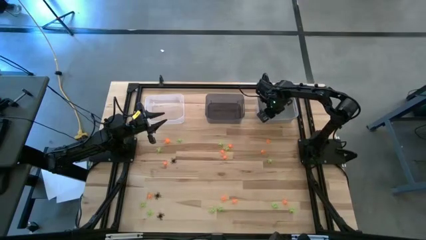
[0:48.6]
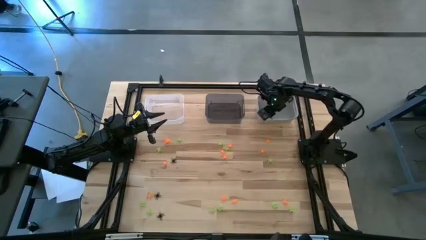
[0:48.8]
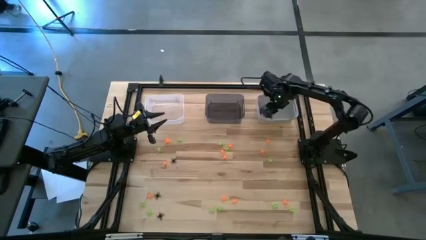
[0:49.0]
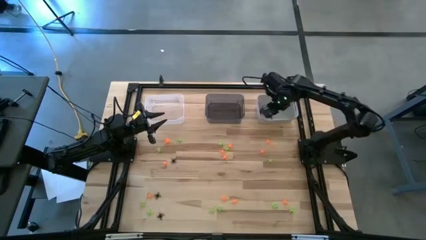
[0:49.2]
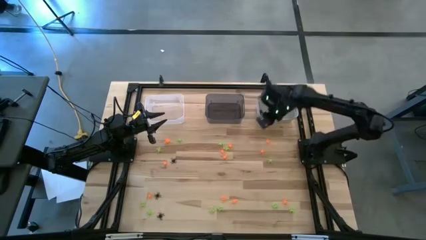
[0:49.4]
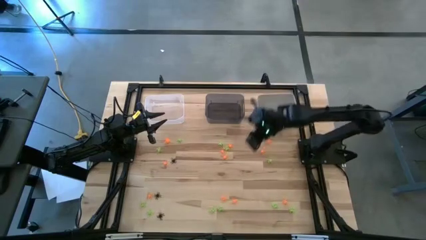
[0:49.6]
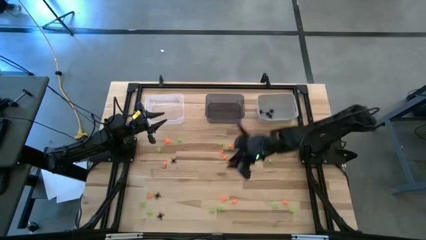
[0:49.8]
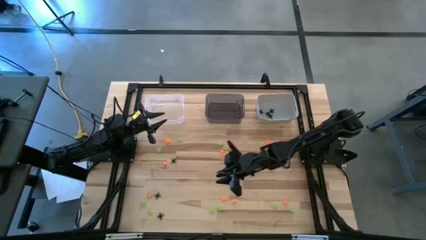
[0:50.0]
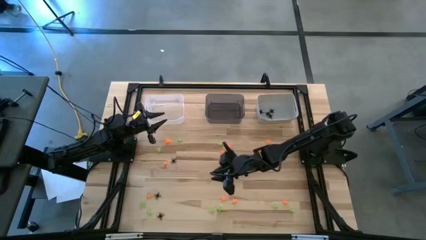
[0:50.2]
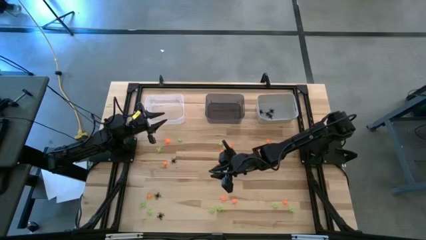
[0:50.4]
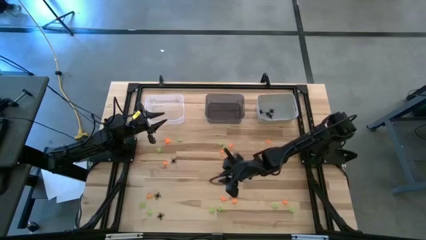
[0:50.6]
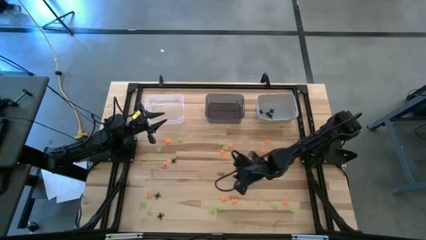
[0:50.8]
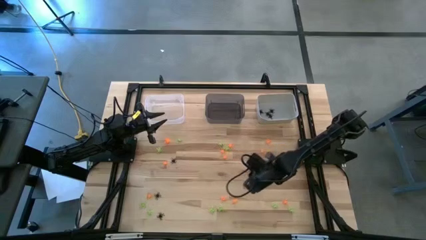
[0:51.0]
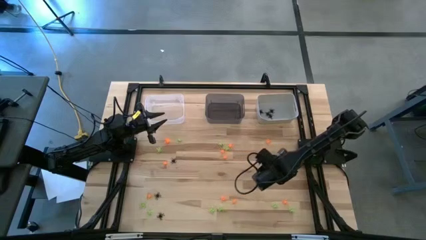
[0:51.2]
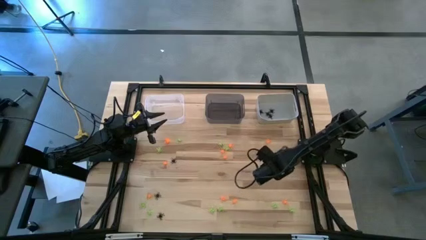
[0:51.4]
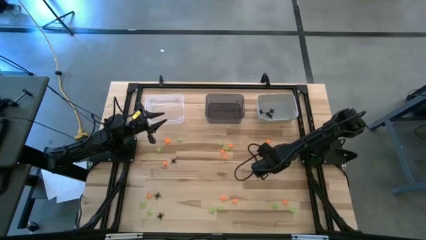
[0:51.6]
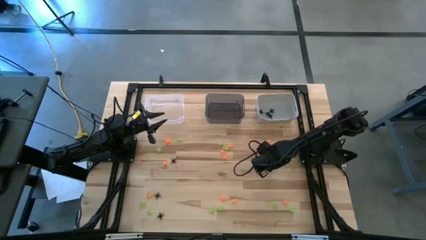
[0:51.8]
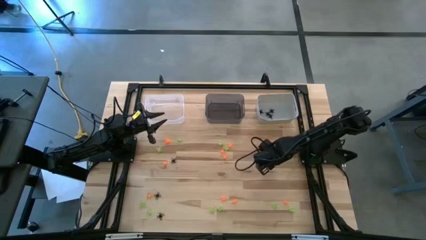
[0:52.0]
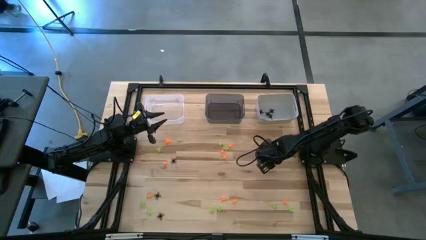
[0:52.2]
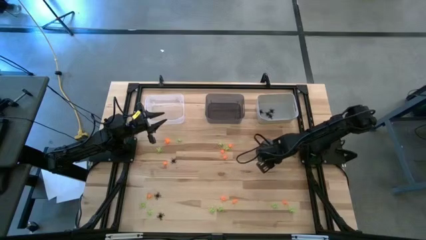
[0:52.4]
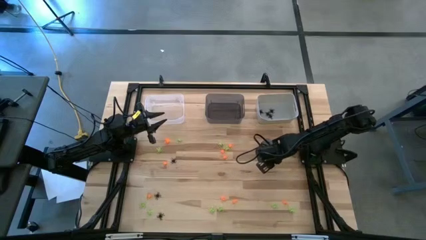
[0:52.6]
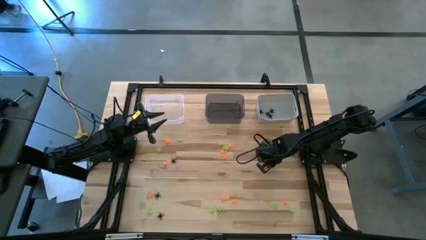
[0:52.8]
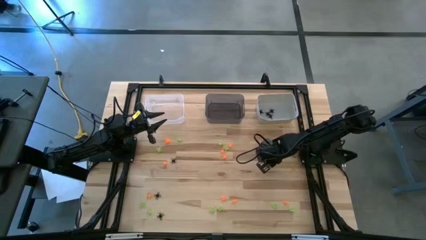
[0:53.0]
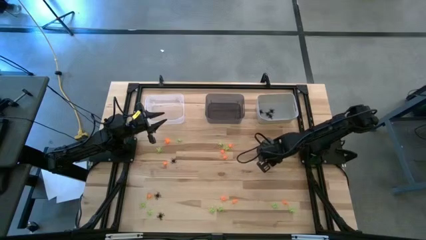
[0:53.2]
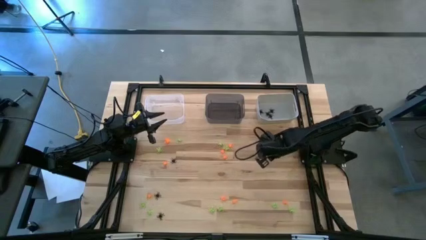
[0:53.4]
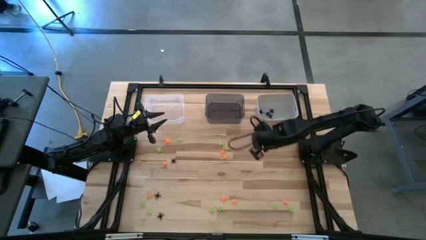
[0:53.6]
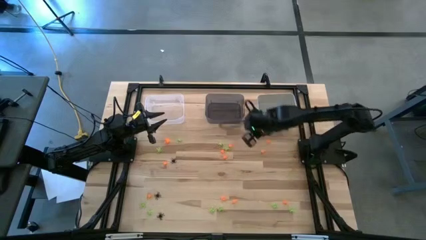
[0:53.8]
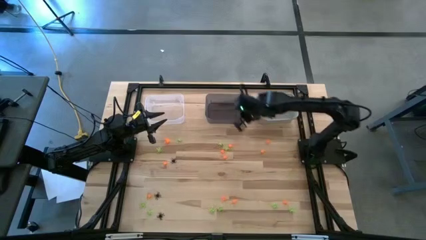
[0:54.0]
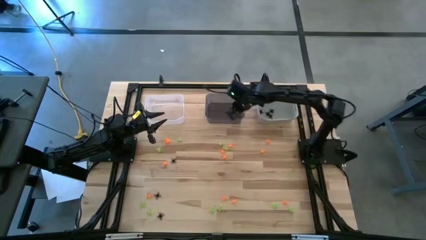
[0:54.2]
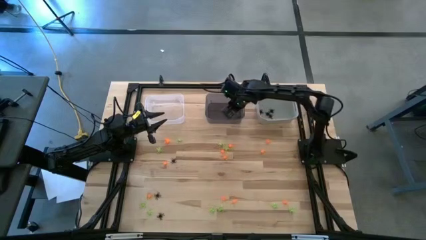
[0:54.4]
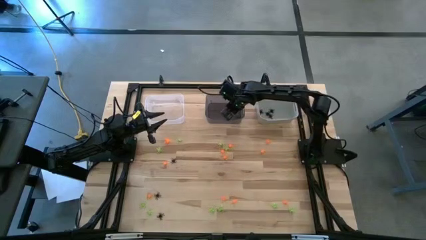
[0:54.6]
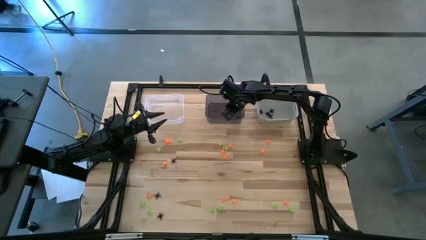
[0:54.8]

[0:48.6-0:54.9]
Task: Sort Halloween decoration
Put the green spider toy into the black bin

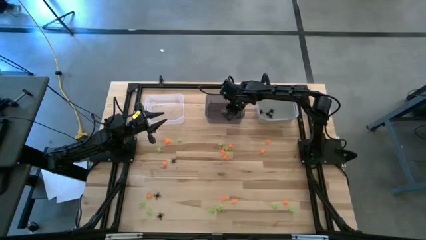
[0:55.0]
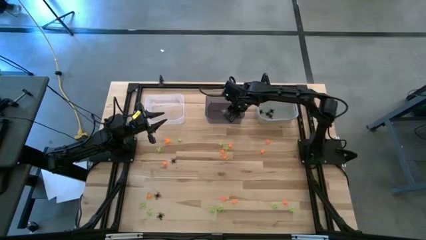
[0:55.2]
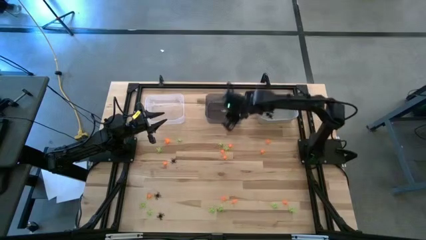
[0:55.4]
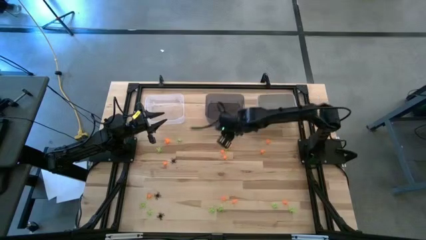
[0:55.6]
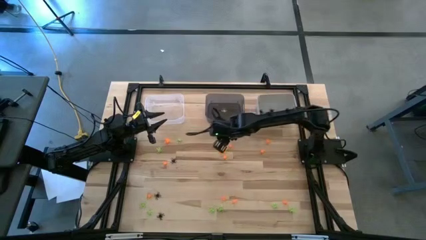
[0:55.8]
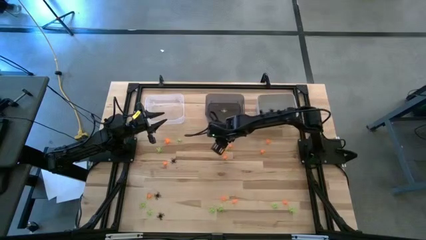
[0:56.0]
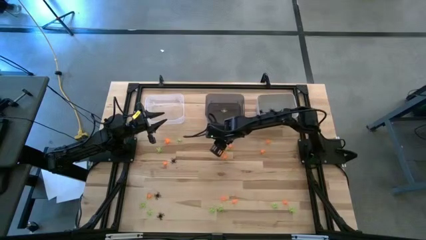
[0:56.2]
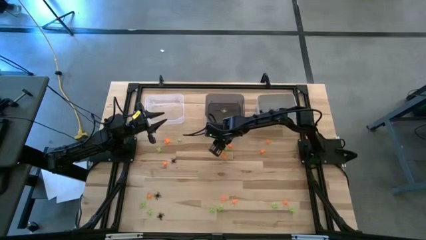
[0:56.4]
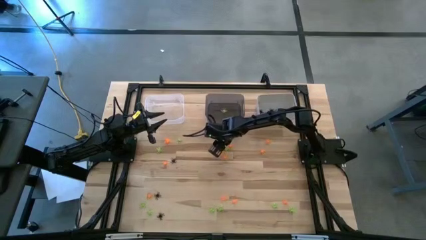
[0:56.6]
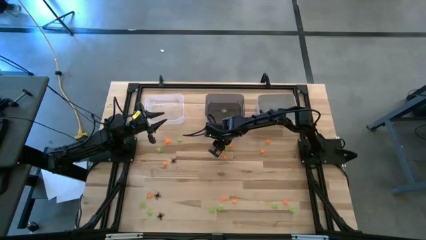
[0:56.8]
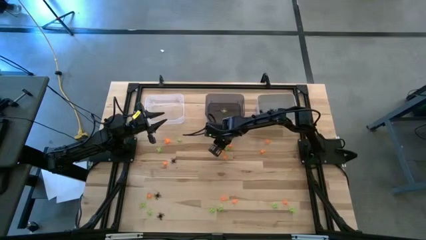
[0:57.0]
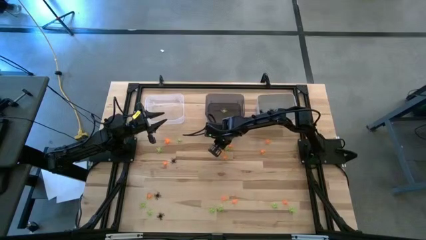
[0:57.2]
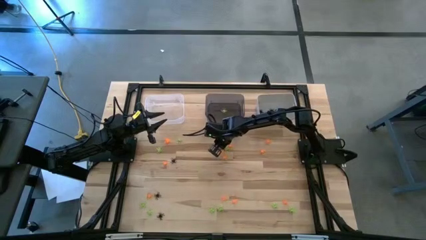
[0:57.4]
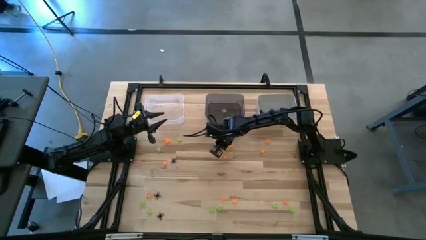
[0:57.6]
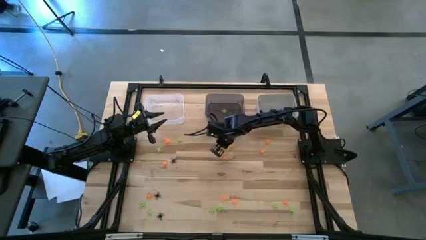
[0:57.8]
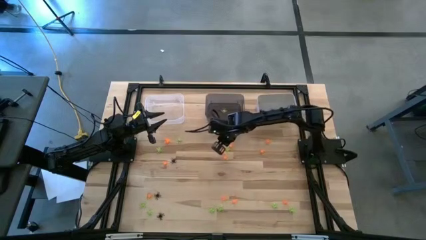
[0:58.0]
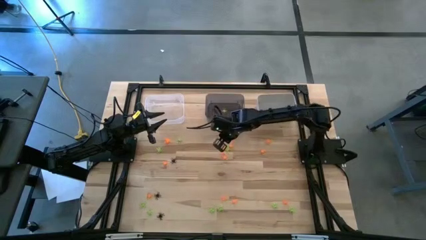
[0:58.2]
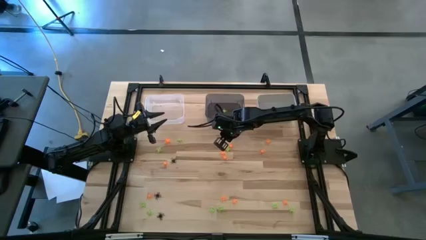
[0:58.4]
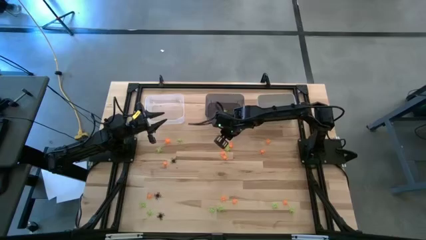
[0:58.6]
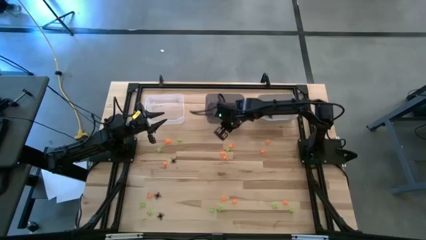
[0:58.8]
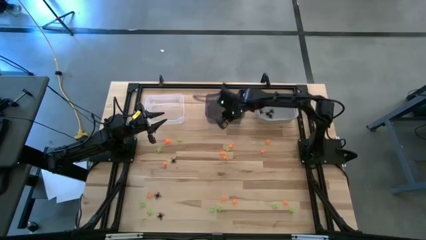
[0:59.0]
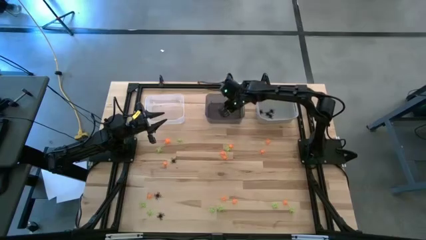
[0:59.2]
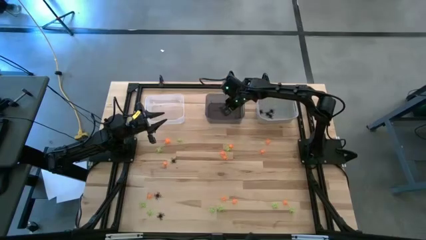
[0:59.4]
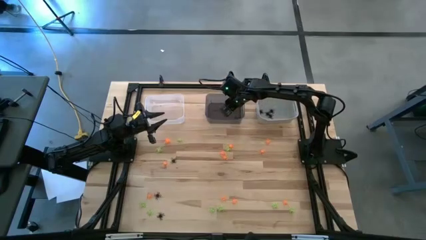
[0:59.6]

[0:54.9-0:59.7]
Put the green spider toy into the black bin

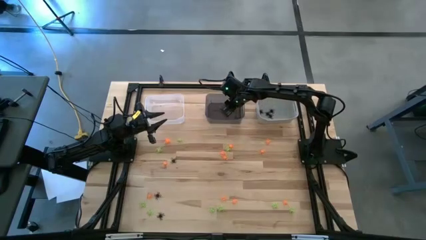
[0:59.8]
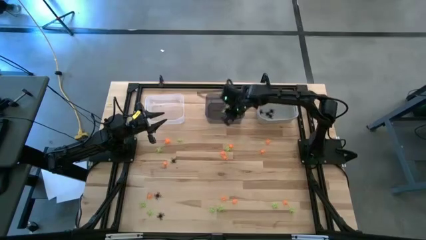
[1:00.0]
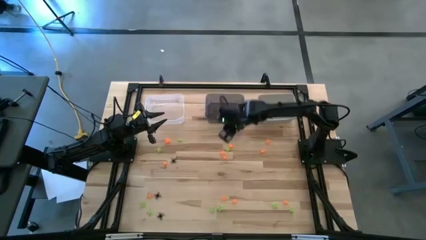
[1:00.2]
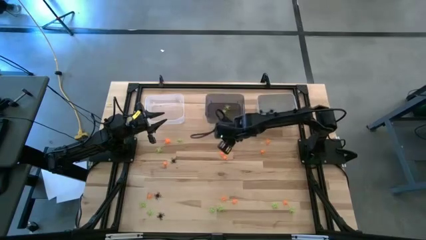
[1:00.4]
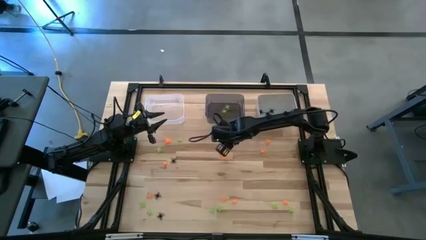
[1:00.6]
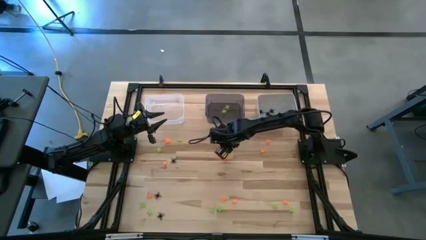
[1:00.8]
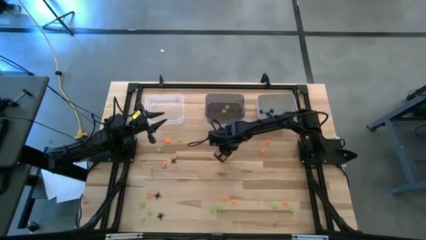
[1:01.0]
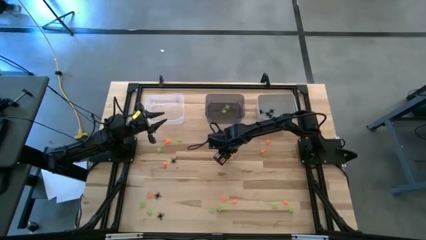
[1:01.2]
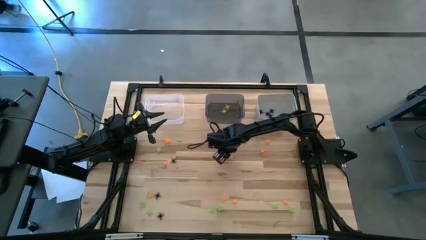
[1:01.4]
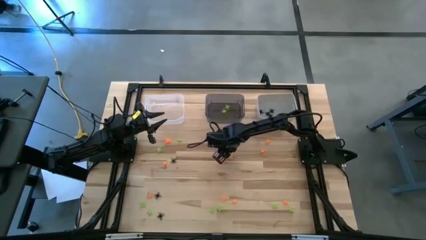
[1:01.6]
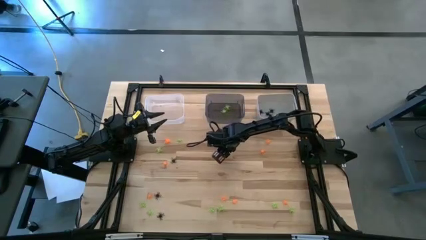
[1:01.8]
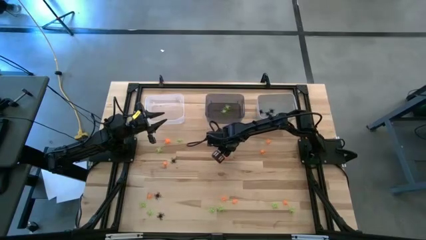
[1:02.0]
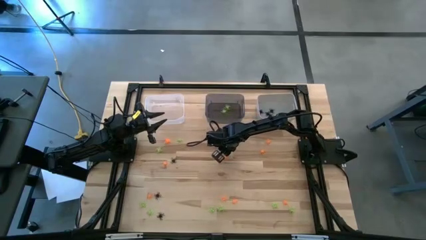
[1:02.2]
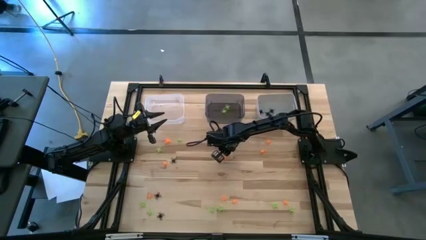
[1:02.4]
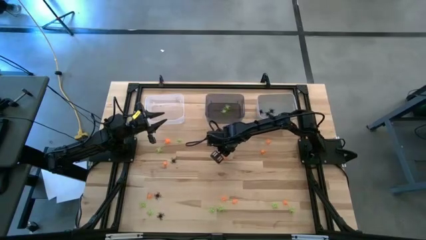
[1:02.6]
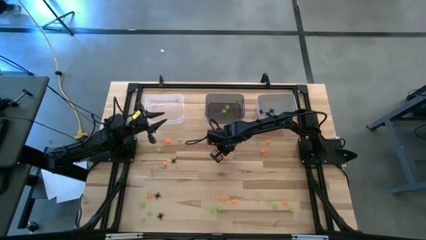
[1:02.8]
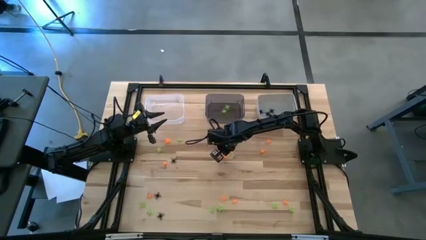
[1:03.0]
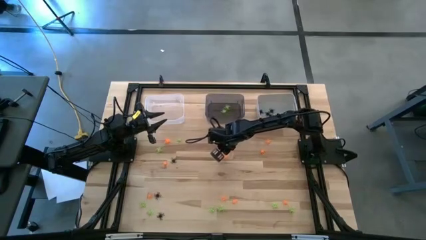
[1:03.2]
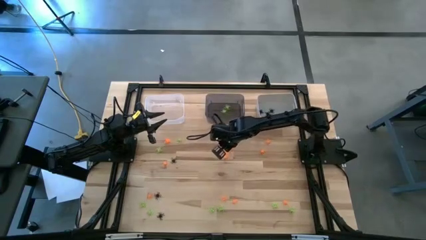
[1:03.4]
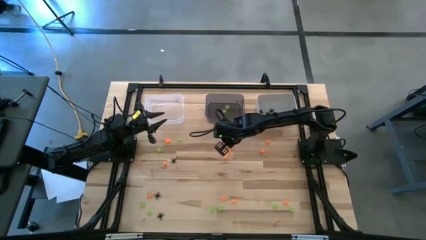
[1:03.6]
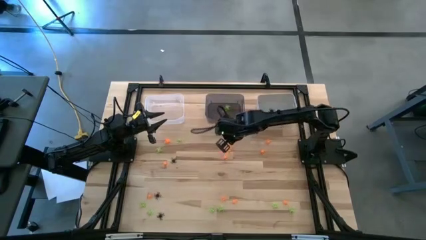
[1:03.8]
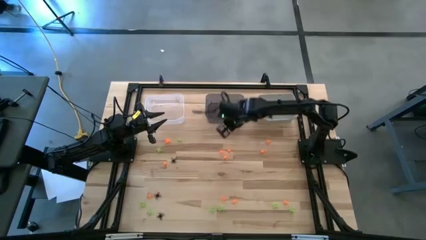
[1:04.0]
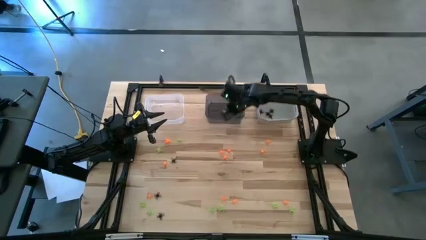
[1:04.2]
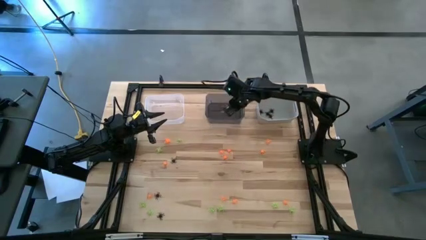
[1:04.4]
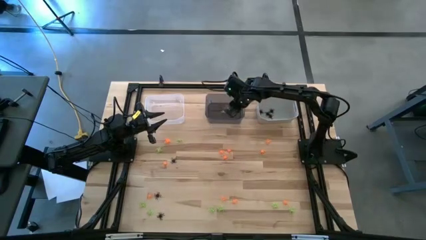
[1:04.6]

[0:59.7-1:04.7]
Put the green spider toy into the black bin

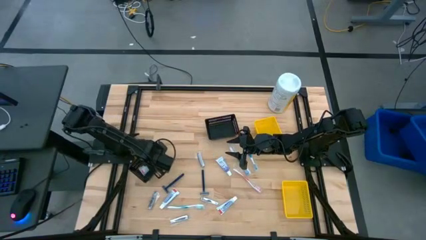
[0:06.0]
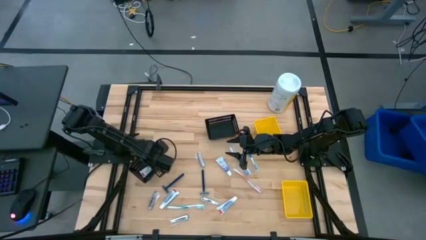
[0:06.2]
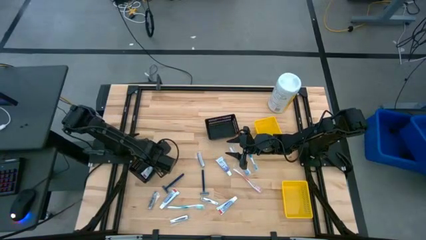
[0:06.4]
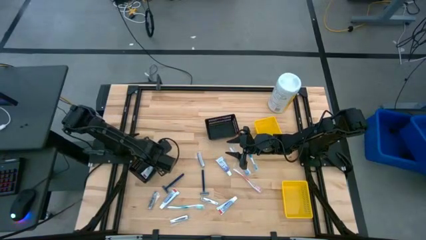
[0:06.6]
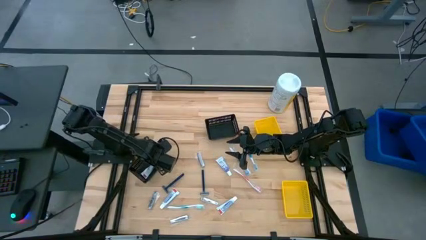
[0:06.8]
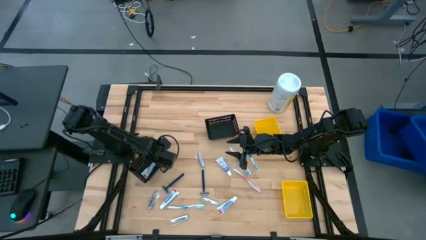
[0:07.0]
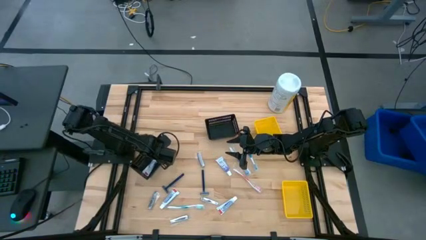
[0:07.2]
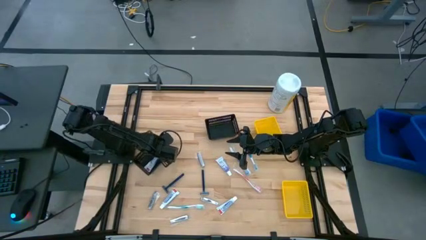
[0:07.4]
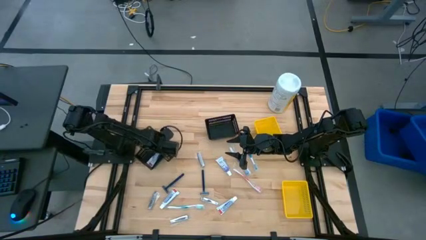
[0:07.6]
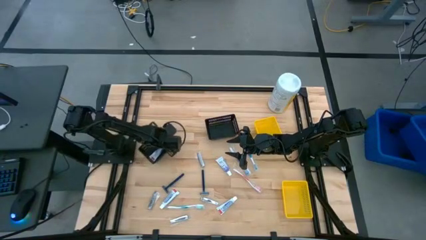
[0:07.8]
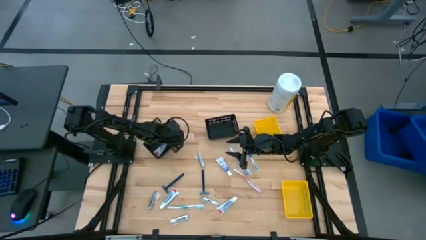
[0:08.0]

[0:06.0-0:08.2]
Task: Pick & Place Travel size toiletries
Adjust the bottom black basket on the table
